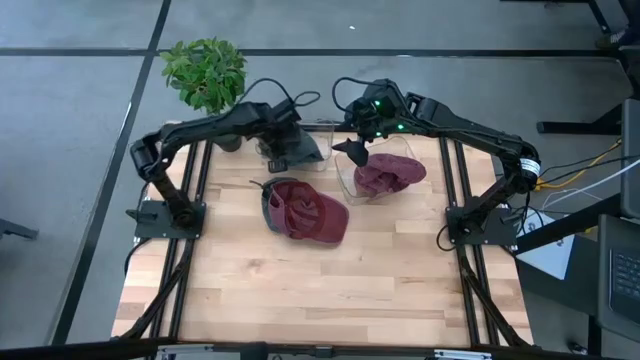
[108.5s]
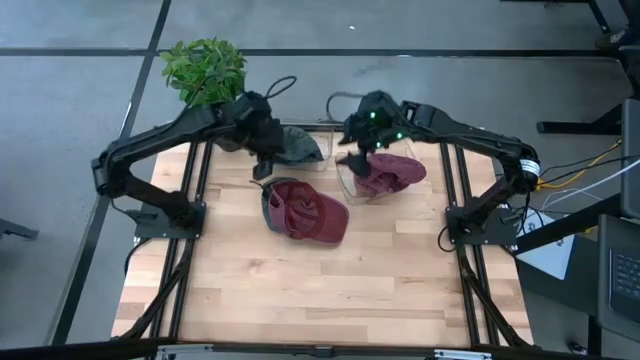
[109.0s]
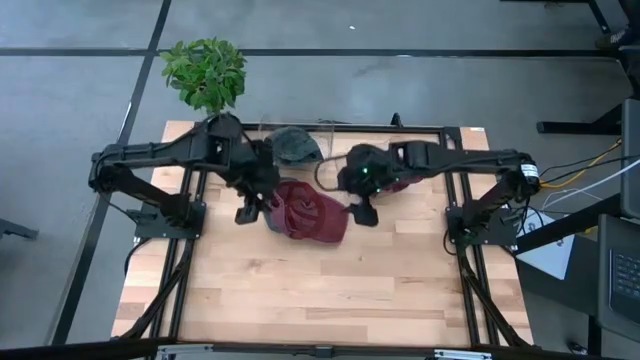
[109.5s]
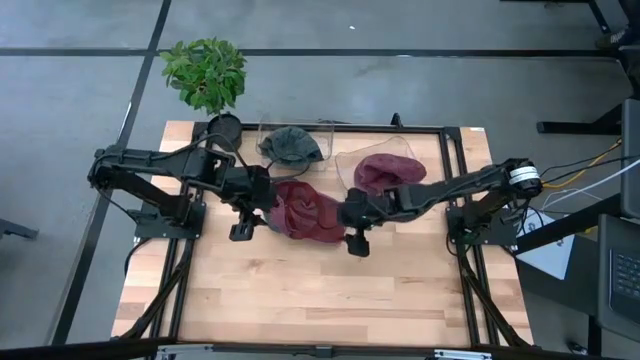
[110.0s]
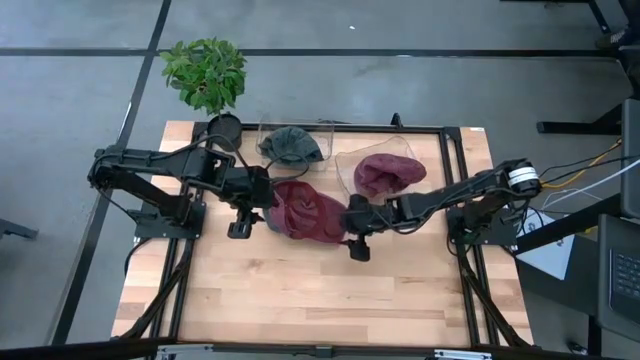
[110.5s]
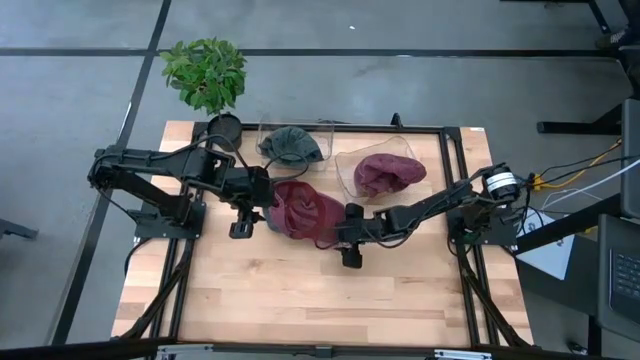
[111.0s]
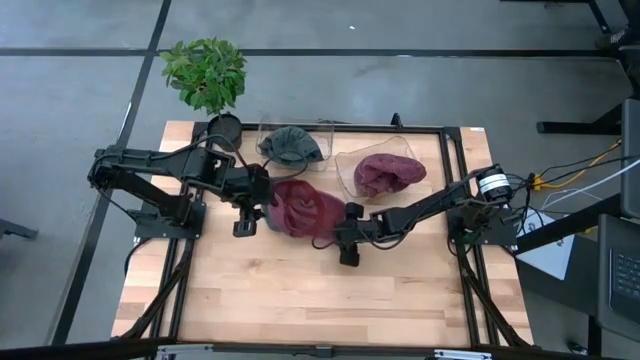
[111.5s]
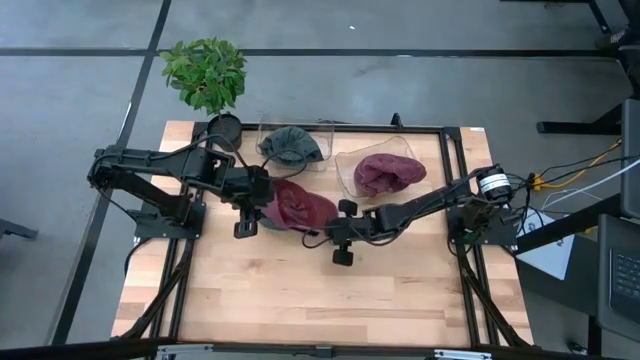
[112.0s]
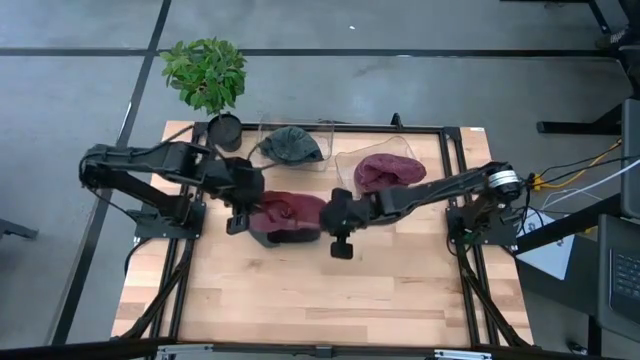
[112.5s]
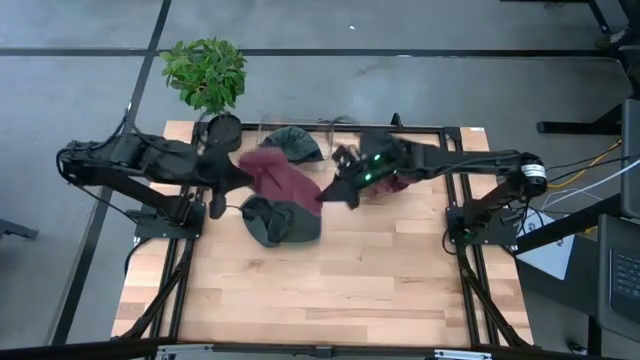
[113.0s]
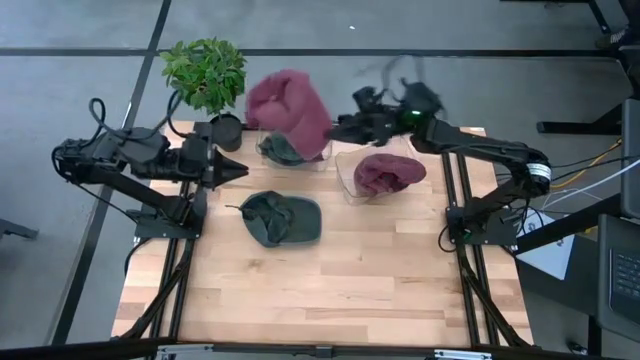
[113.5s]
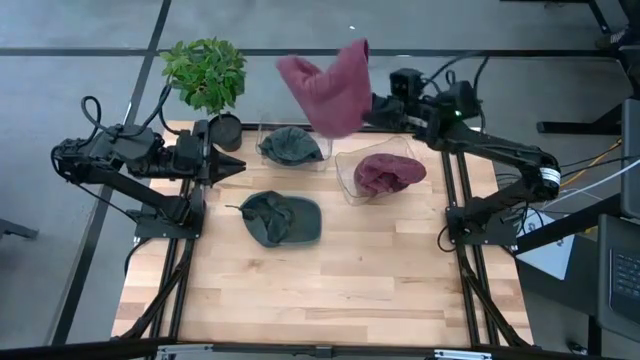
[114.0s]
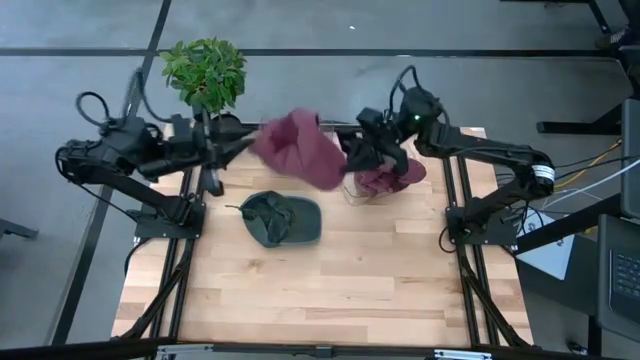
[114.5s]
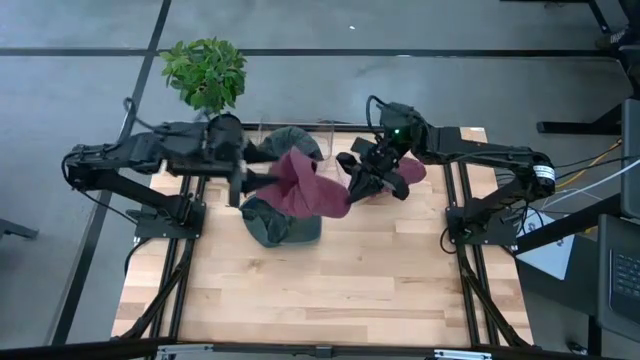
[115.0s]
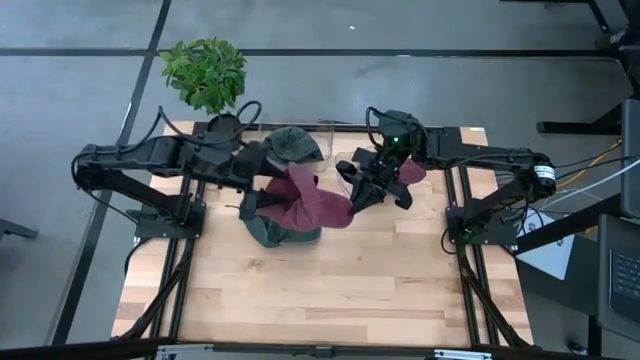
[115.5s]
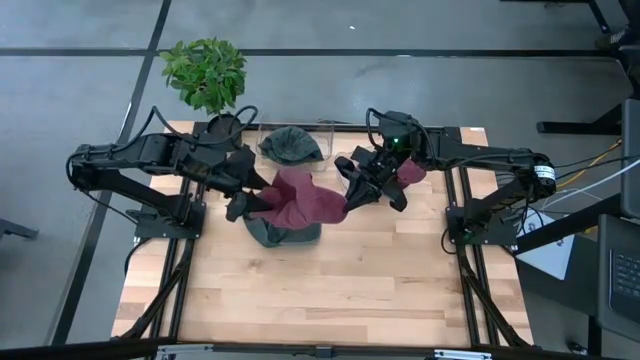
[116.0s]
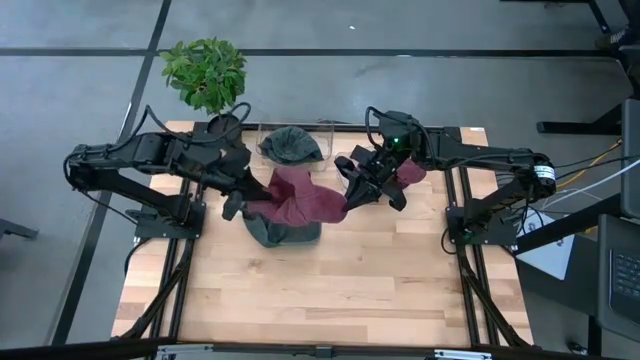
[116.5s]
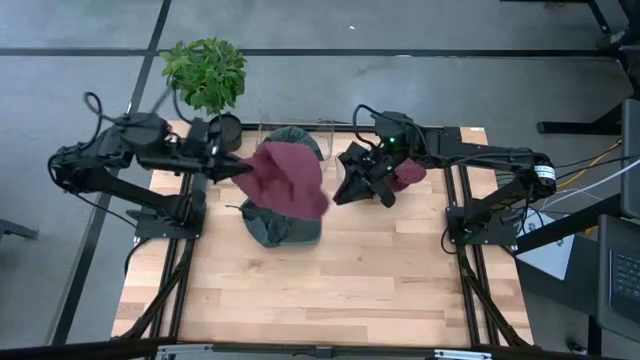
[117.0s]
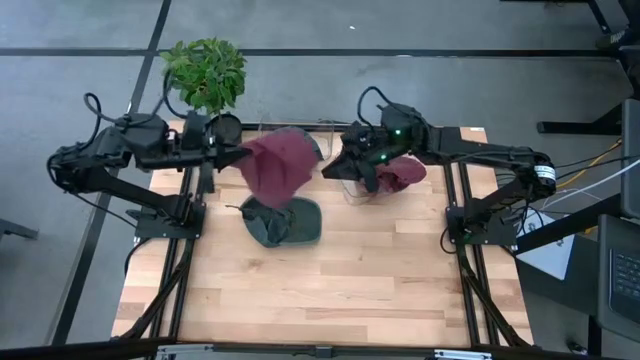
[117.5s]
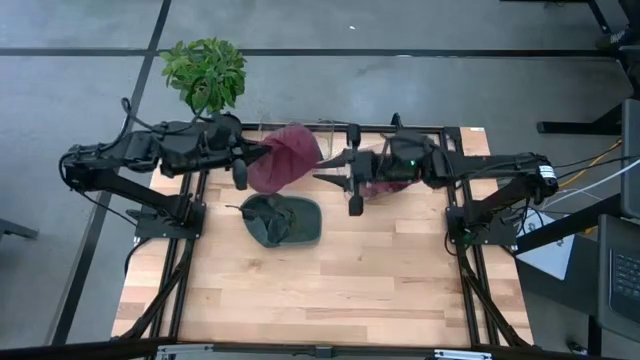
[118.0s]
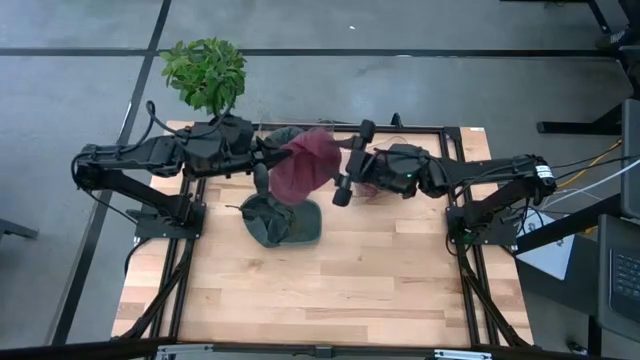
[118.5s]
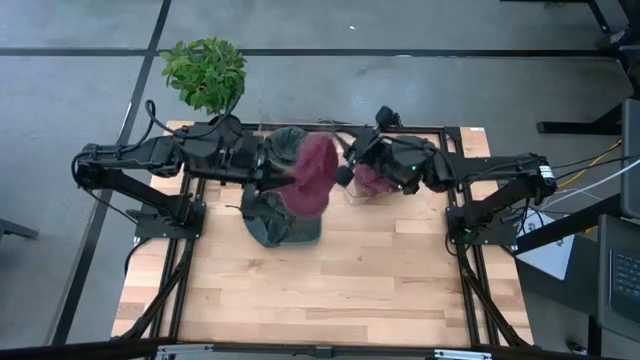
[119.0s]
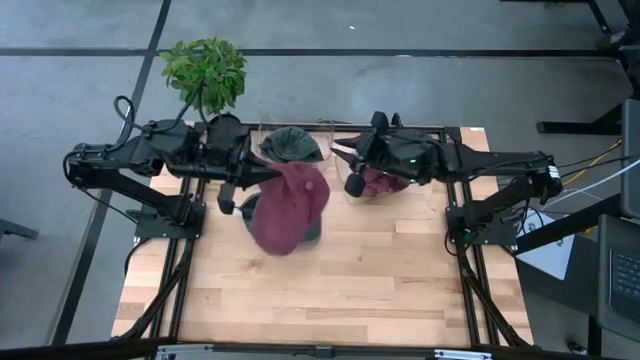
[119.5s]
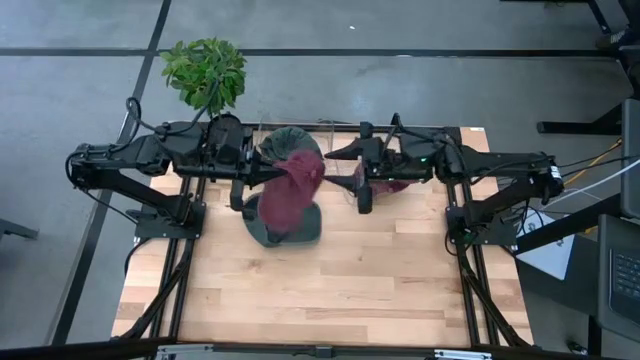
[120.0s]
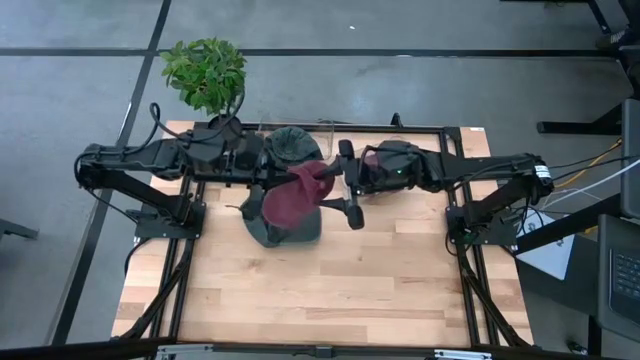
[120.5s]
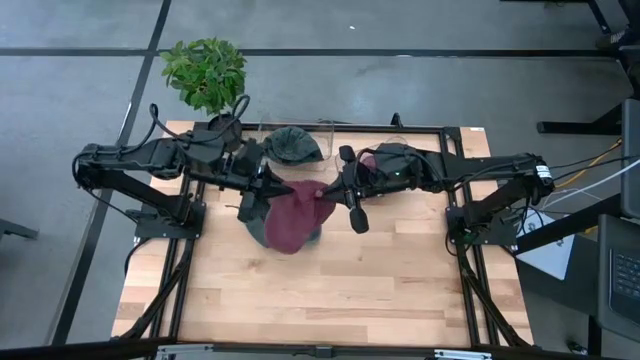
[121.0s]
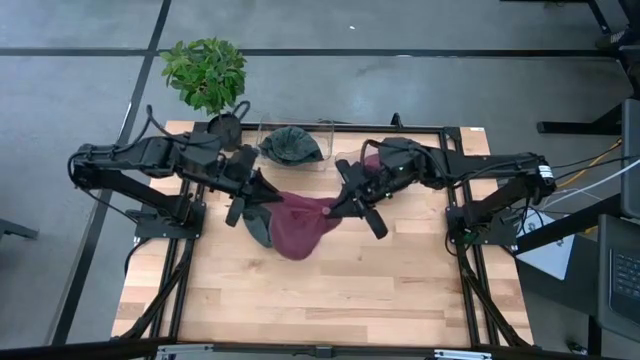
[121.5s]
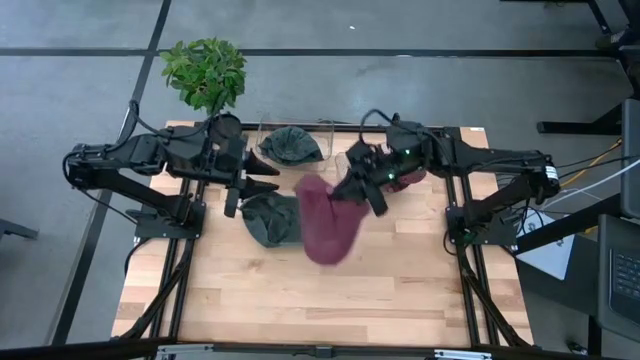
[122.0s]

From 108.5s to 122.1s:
Task: Pick & Place hat
Put the red cap into the right transparent bin

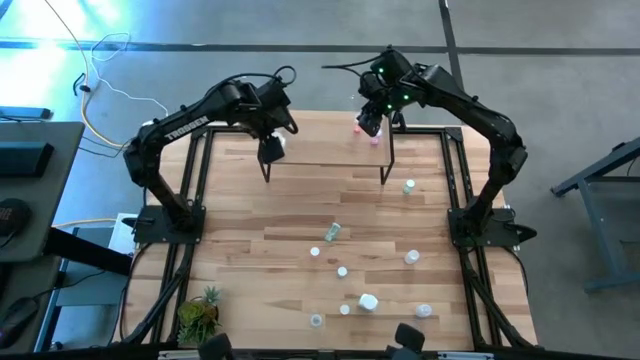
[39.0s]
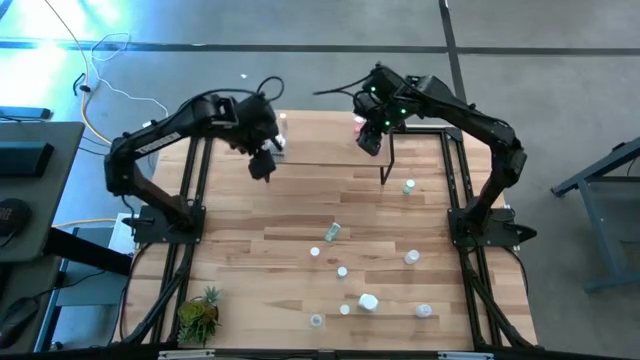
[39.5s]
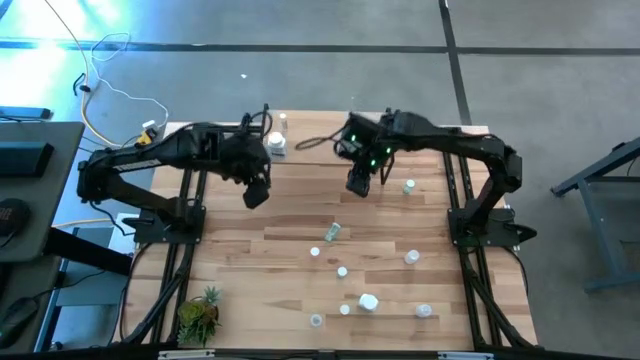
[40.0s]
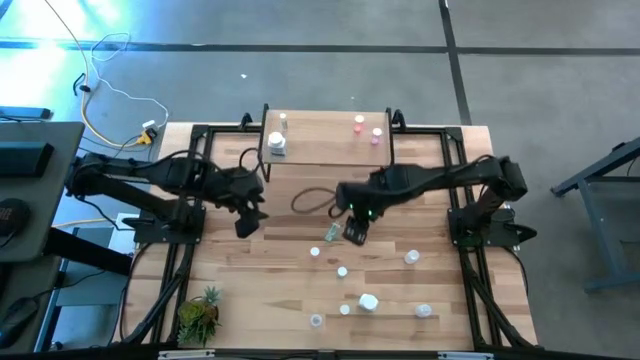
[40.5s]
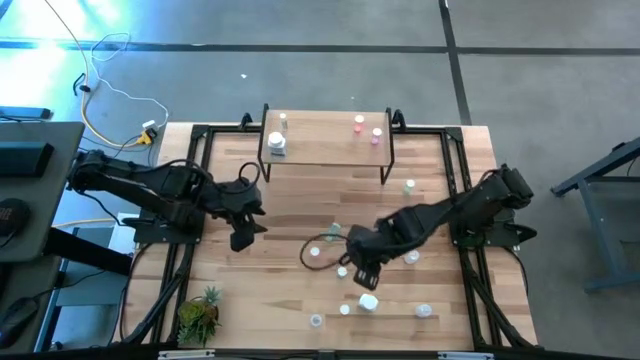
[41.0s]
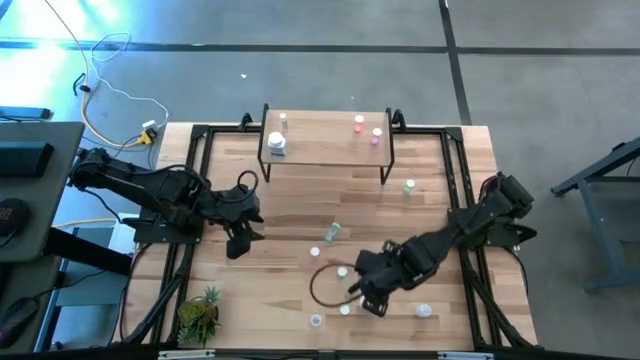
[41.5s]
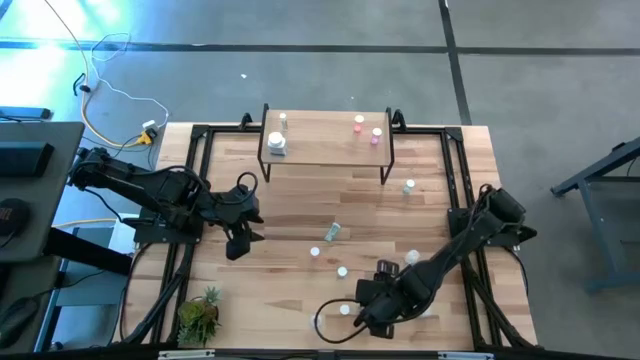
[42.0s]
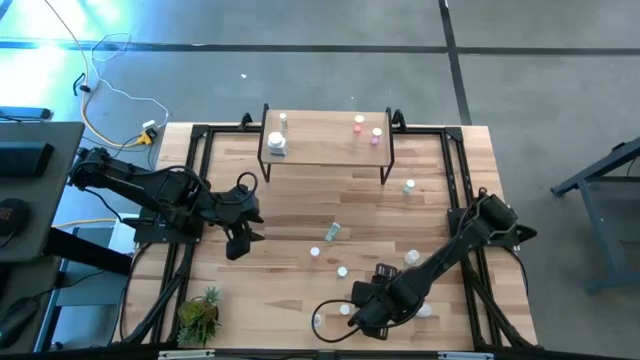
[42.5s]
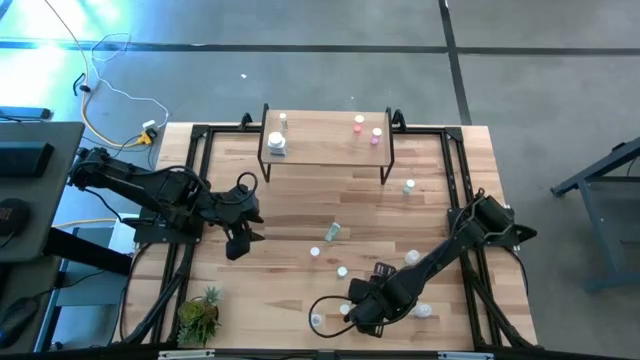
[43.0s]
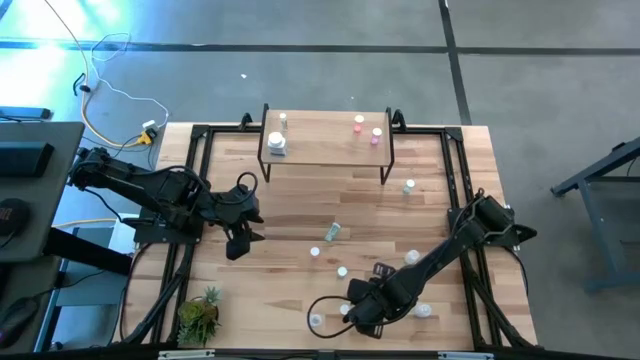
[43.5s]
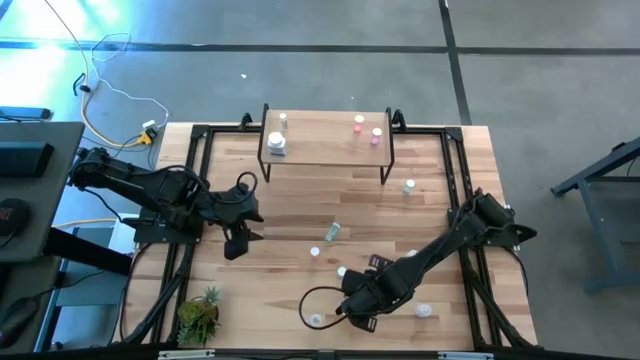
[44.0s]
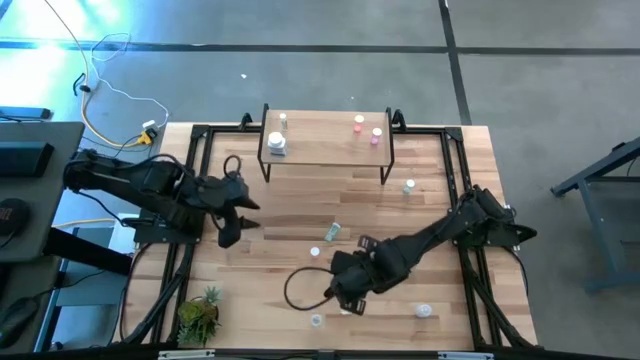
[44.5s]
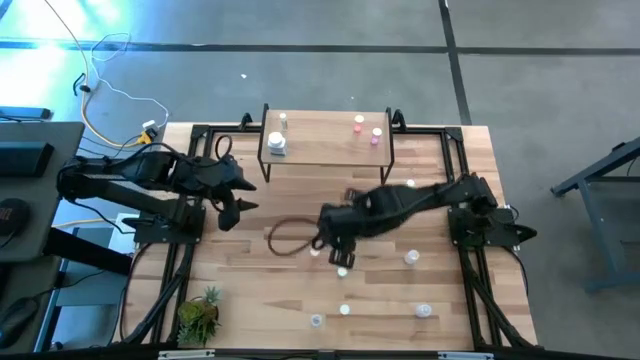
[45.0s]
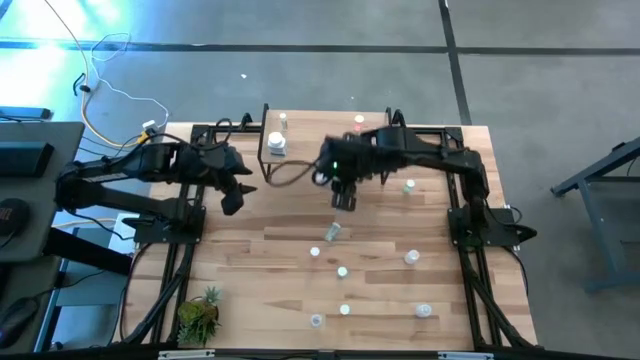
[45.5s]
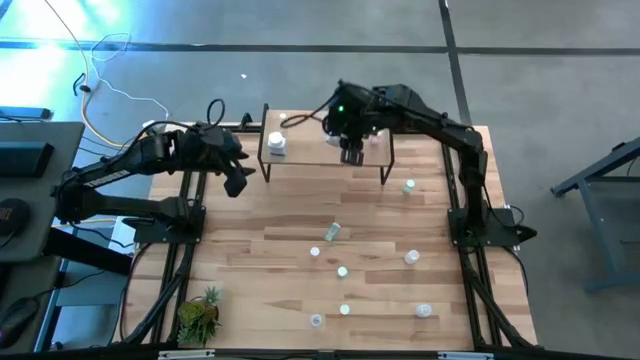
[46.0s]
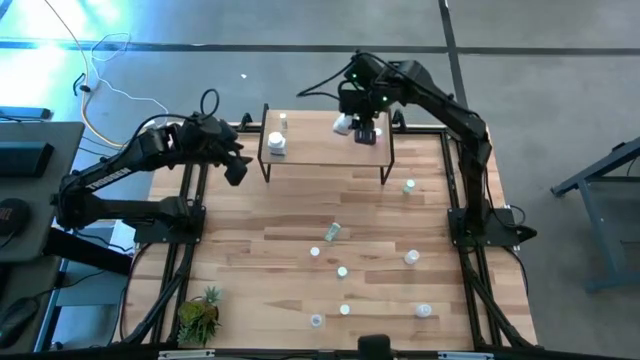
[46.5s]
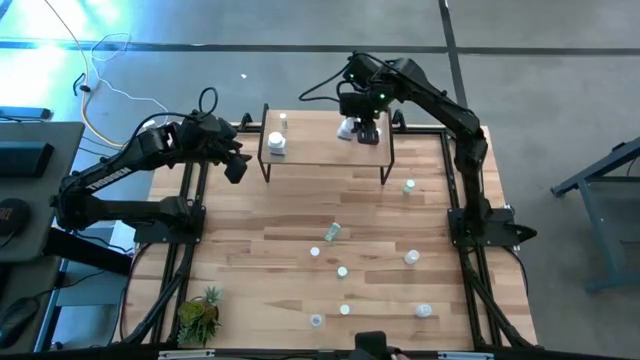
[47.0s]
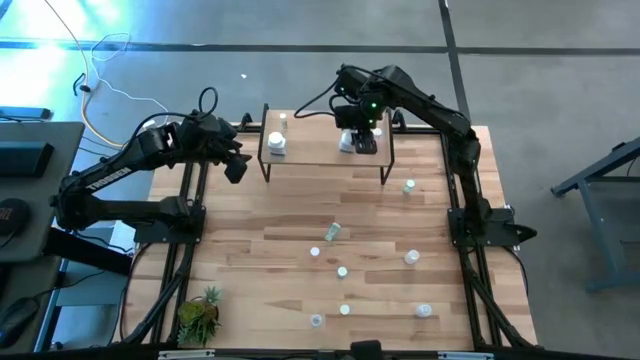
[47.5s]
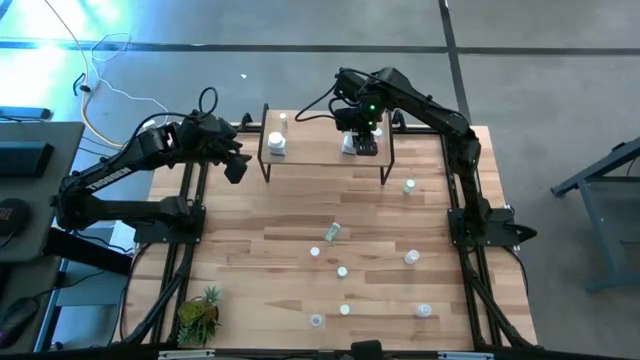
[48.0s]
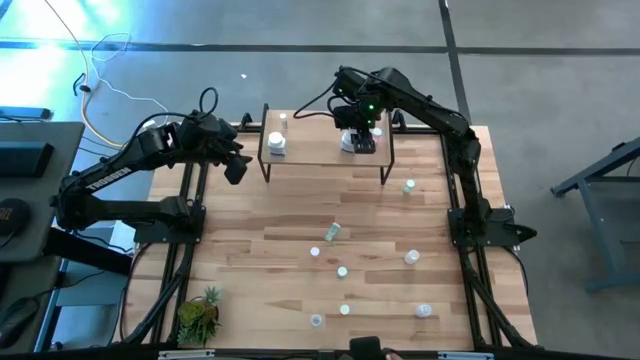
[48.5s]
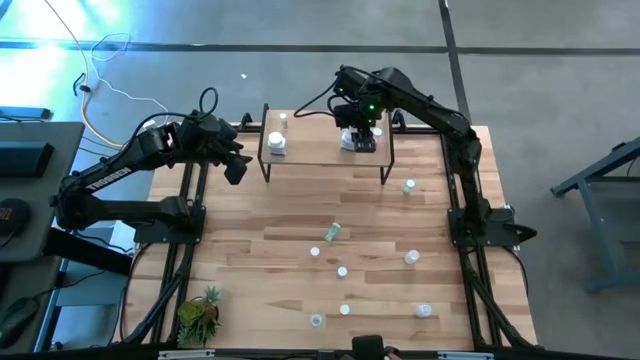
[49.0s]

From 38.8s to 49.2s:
Task: Pick and place medicine bottles onto shelf by color
Put the white pill bottle on the shelf
